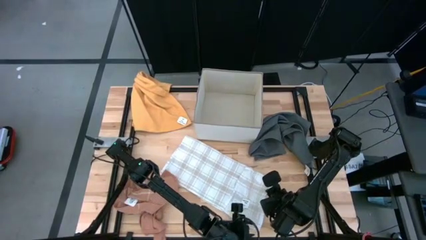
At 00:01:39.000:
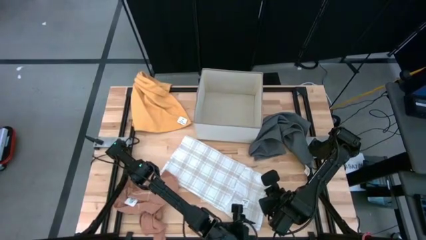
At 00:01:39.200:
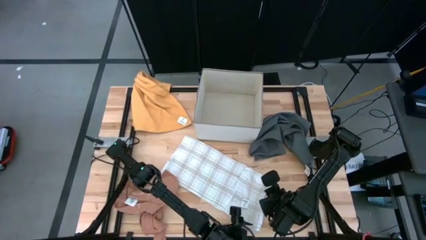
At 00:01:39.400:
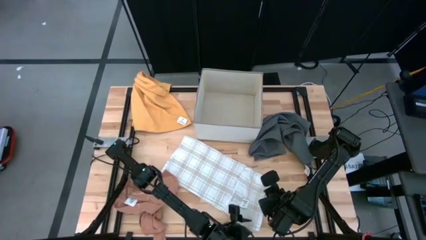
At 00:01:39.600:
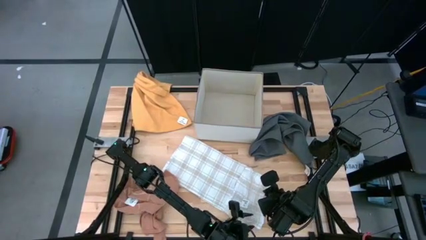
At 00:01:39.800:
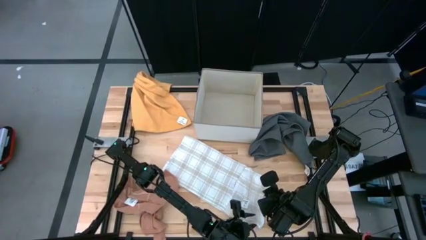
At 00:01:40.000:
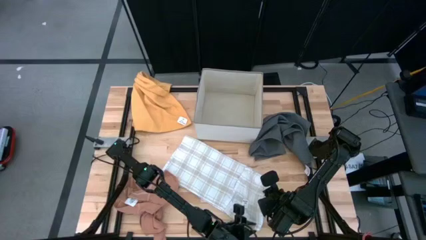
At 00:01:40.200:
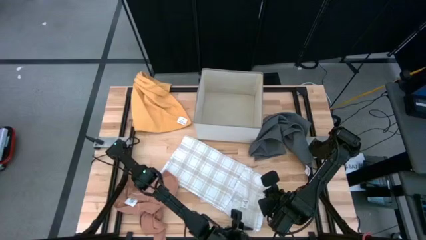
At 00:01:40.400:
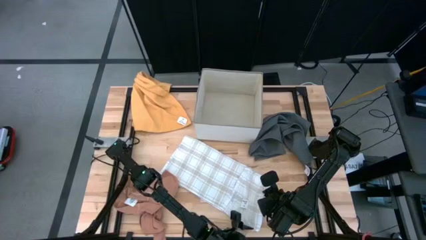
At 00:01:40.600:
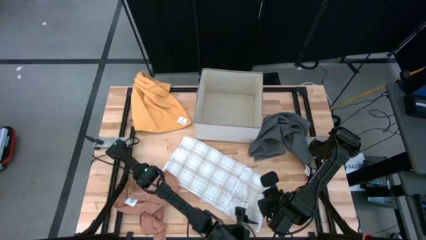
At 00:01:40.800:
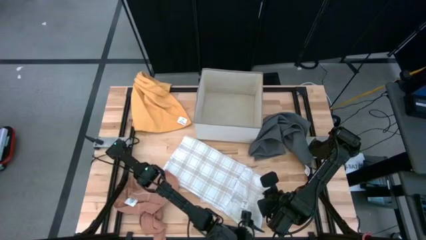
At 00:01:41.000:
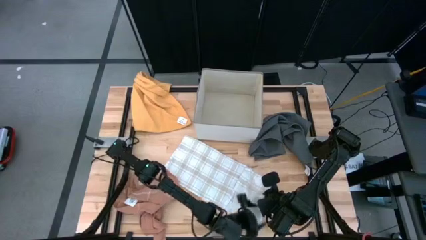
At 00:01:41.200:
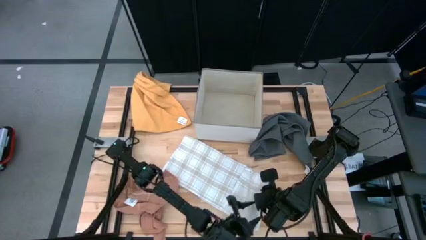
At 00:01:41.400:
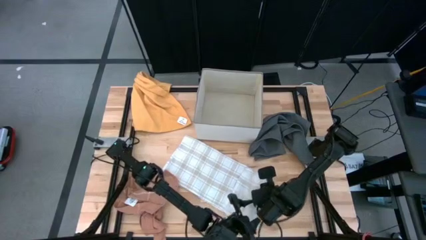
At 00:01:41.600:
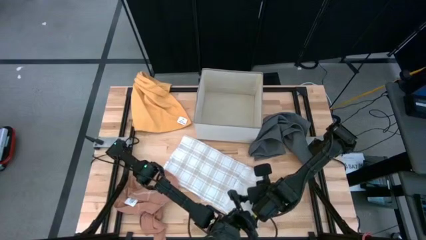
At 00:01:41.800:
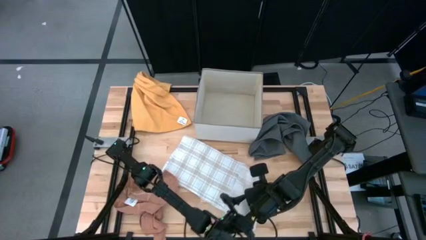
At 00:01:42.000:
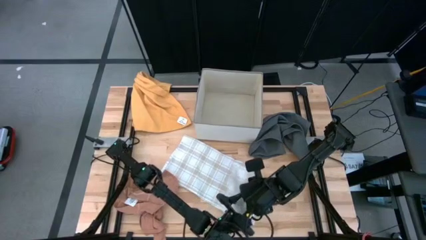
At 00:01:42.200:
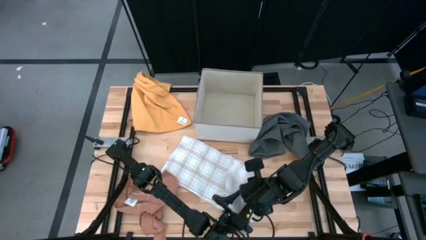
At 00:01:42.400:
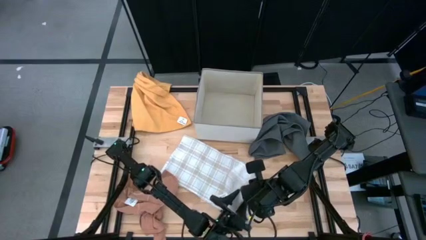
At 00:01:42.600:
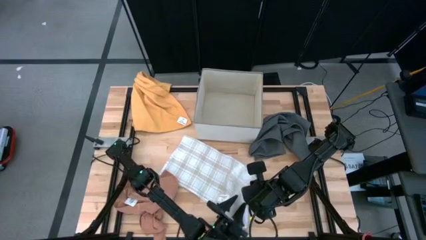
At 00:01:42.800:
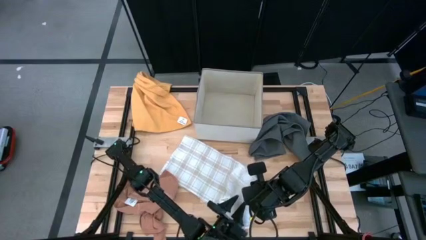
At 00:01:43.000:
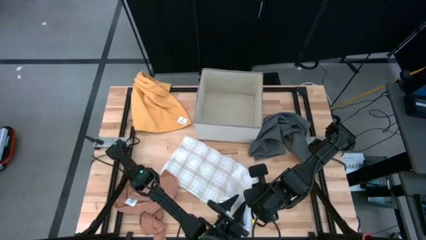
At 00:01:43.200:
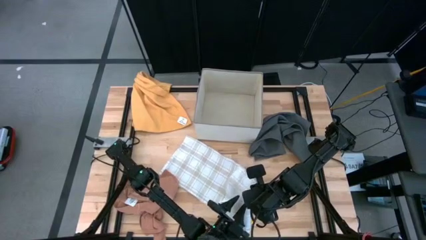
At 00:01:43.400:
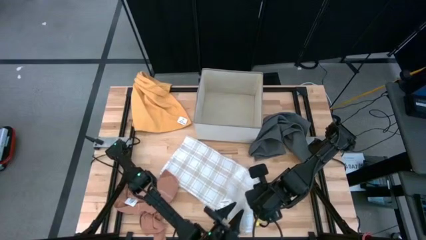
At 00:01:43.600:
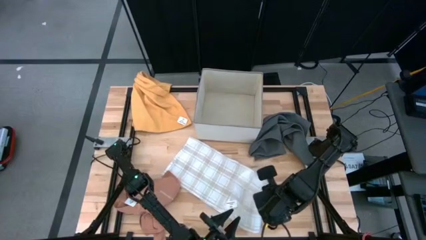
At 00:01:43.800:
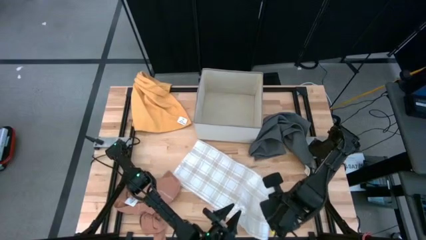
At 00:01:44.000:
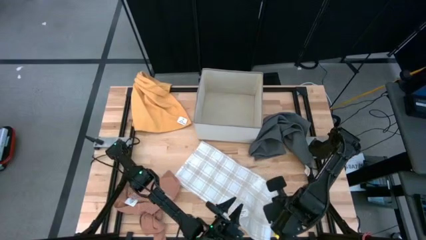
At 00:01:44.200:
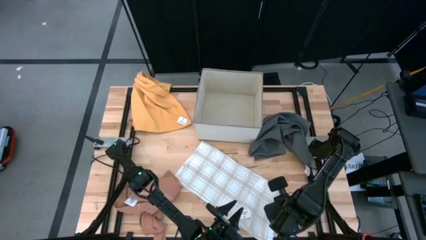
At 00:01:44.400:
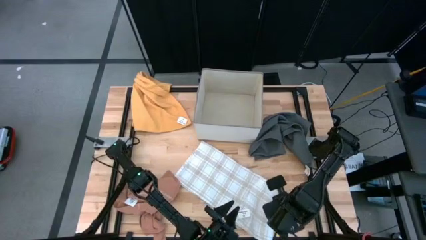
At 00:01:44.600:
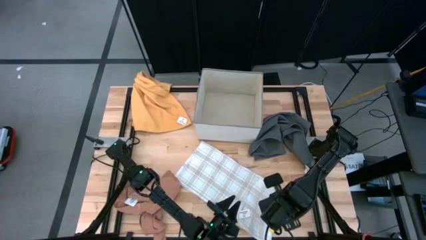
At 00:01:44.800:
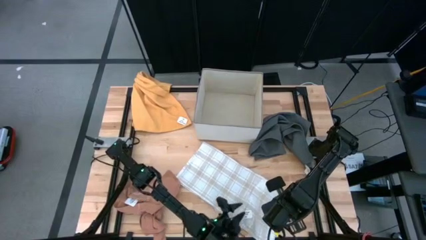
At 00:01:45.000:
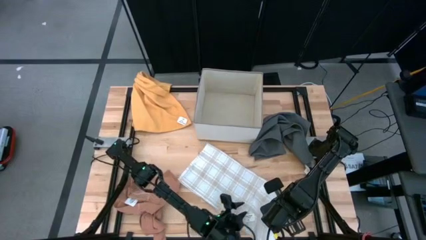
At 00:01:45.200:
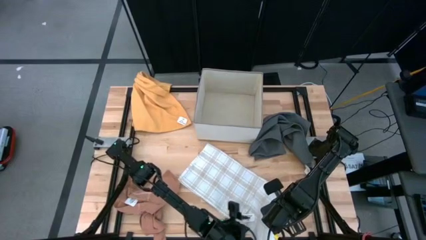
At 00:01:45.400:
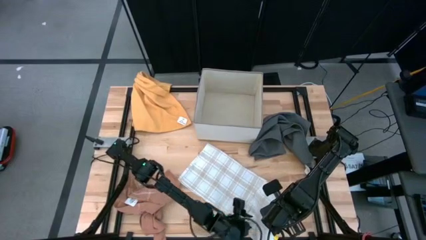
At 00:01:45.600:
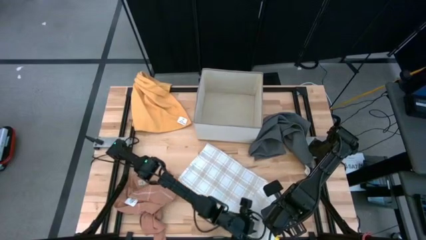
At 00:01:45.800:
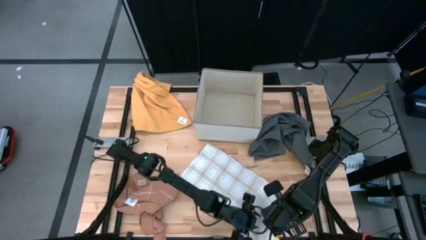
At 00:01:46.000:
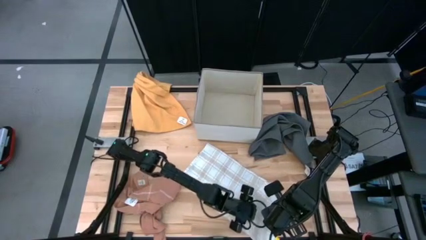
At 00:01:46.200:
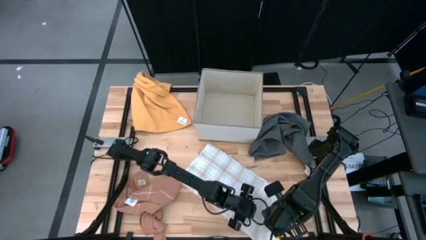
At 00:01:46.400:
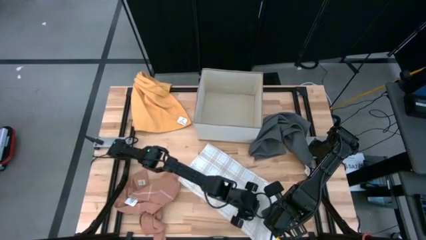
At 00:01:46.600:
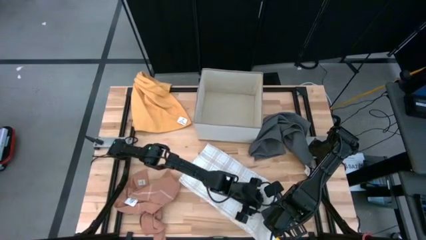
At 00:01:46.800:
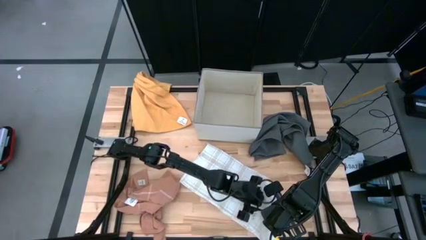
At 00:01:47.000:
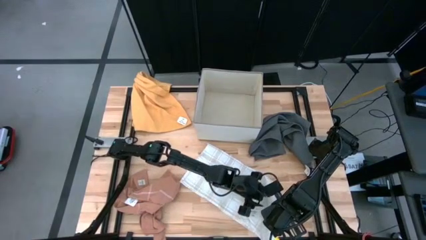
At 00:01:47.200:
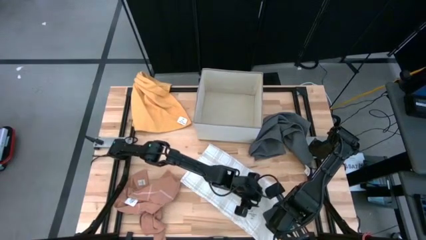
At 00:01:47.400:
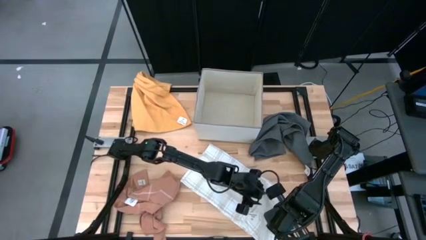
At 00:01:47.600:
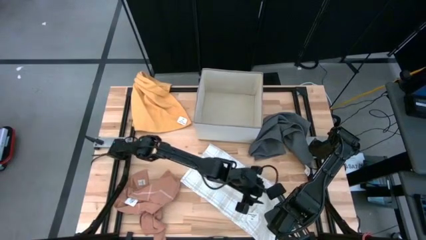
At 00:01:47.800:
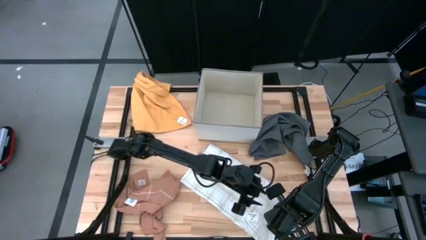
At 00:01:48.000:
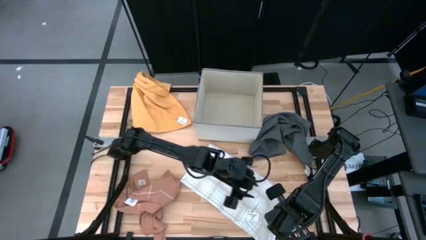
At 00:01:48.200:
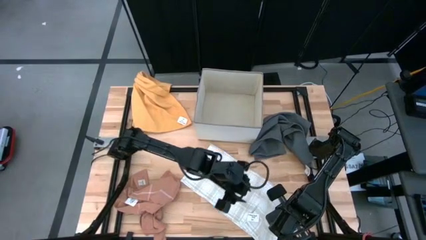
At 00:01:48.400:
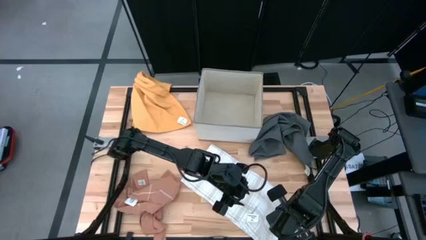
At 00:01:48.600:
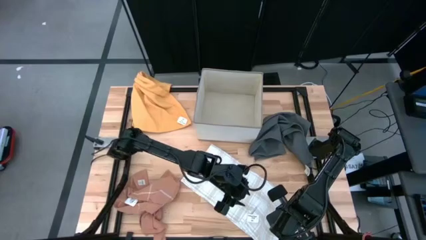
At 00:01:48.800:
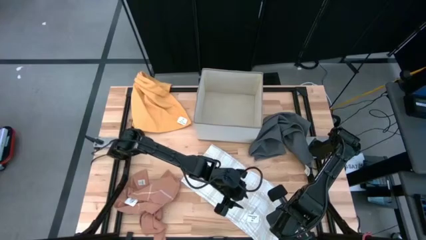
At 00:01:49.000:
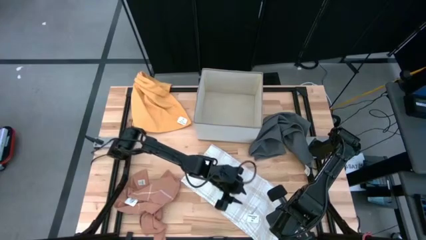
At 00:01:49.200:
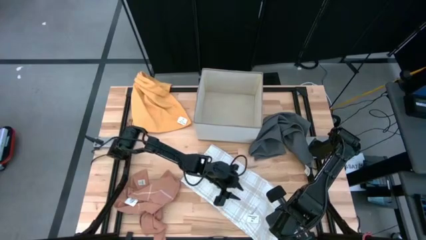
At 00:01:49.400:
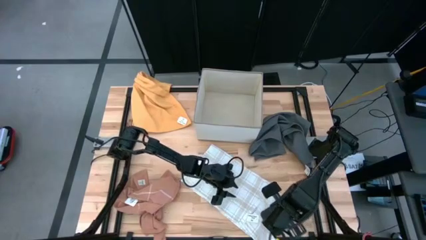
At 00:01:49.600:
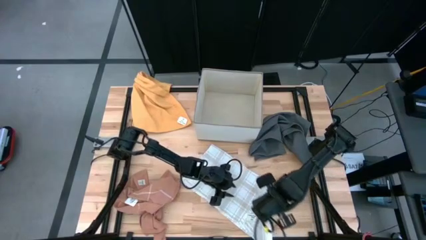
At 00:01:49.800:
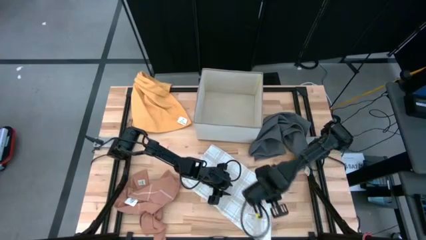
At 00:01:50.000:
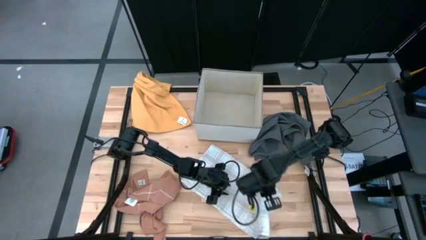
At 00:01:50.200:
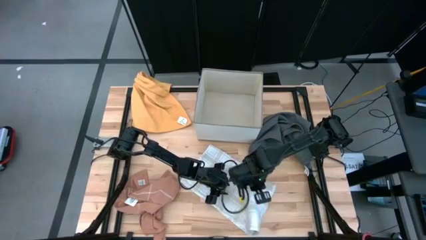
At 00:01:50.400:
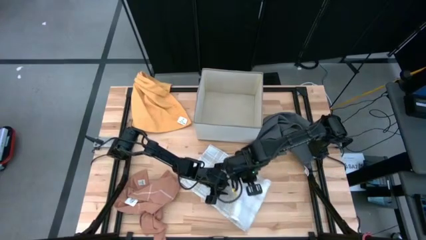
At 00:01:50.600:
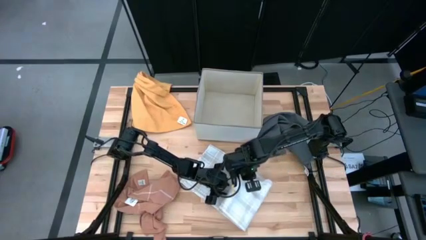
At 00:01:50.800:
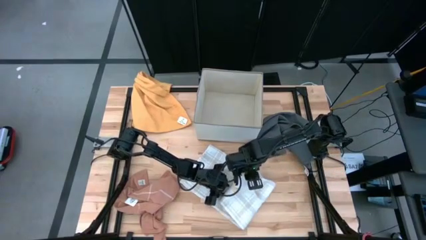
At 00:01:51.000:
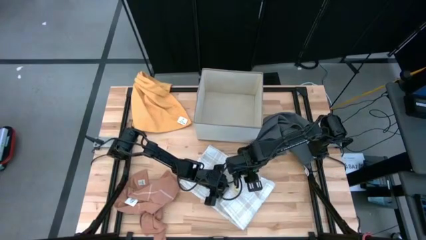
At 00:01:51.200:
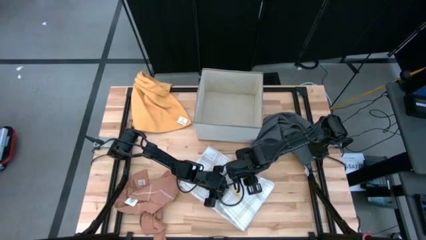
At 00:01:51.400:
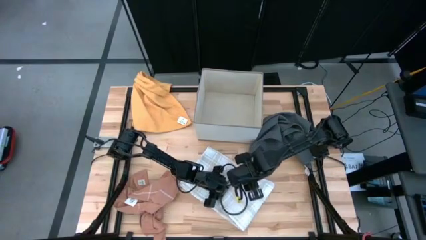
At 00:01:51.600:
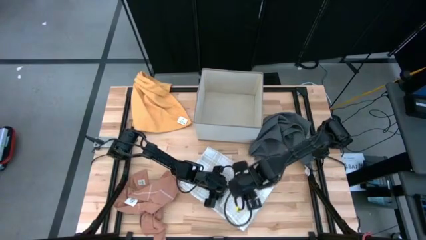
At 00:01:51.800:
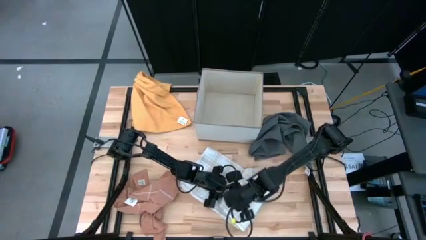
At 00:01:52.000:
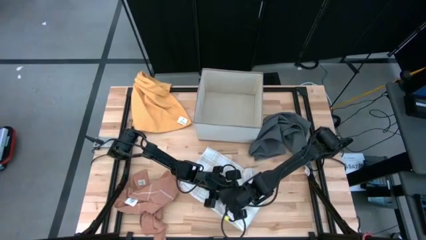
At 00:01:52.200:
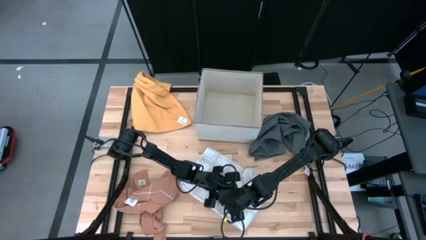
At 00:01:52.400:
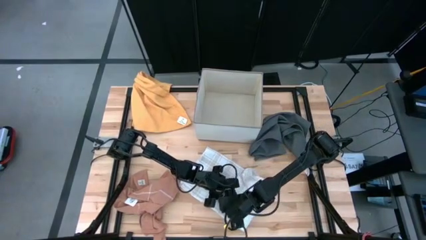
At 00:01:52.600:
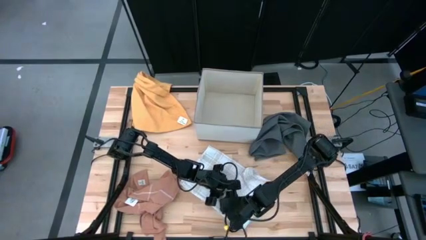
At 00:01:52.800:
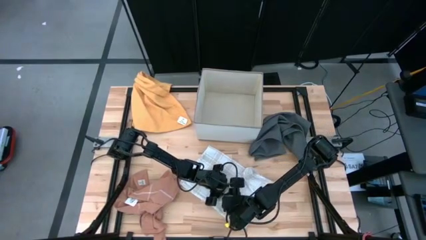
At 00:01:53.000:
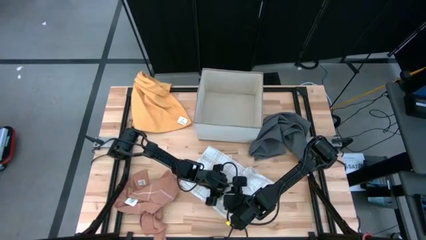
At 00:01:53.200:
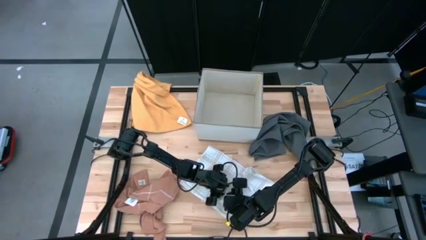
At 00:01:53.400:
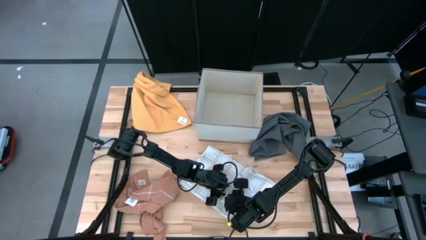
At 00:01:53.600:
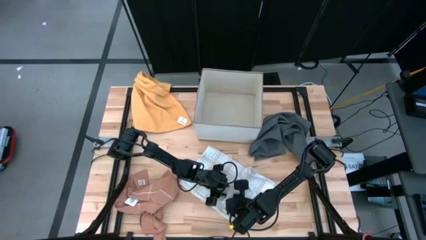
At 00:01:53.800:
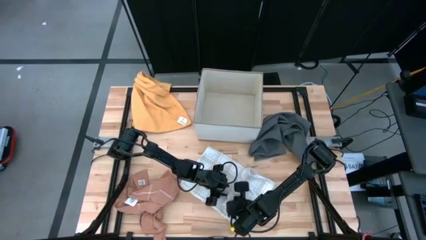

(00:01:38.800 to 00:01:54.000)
Task: Fold towel
Fold the white towel
